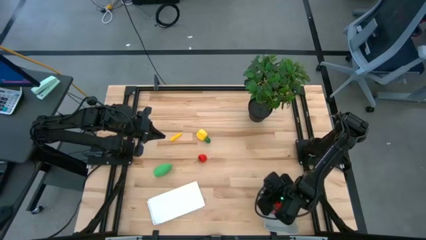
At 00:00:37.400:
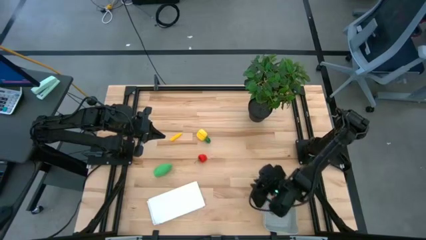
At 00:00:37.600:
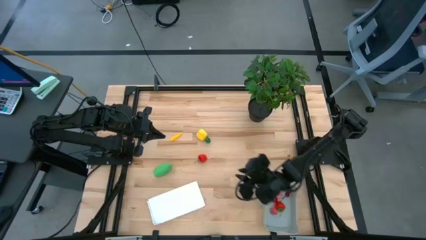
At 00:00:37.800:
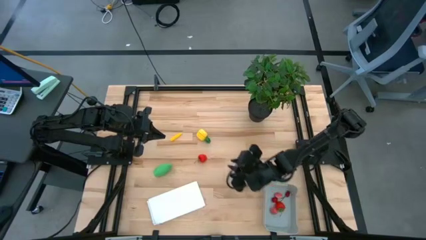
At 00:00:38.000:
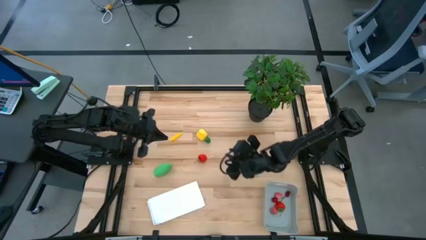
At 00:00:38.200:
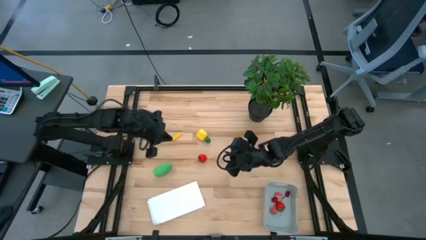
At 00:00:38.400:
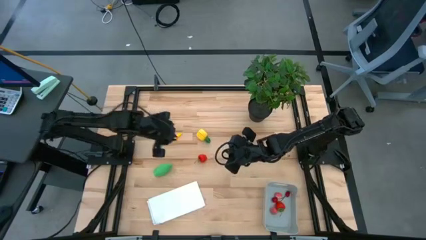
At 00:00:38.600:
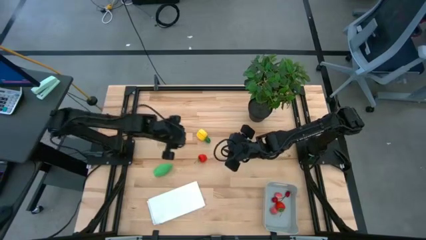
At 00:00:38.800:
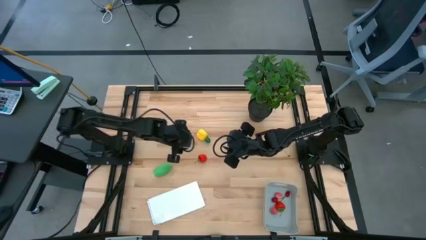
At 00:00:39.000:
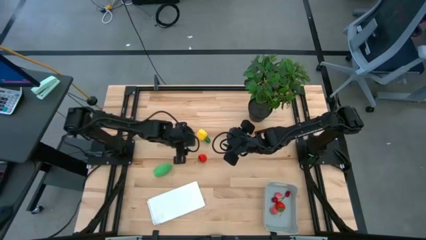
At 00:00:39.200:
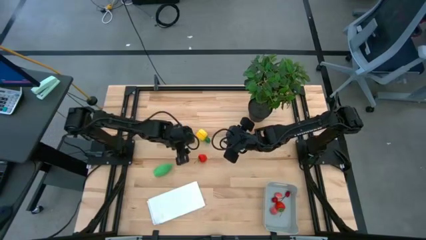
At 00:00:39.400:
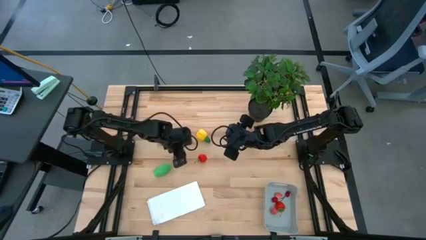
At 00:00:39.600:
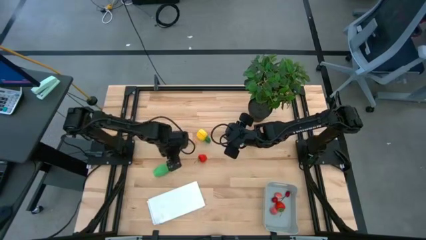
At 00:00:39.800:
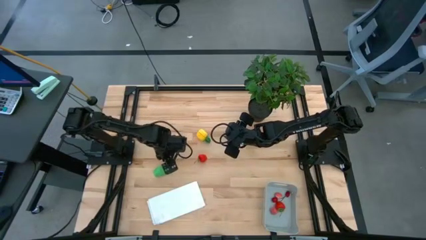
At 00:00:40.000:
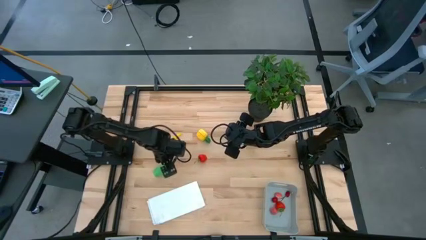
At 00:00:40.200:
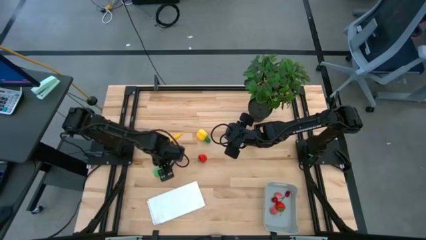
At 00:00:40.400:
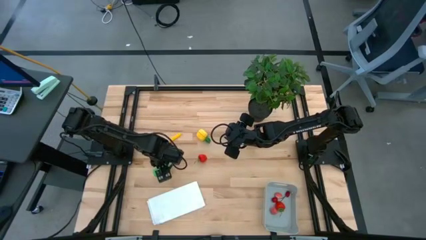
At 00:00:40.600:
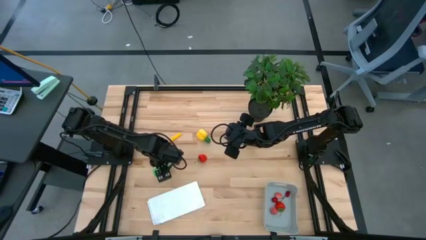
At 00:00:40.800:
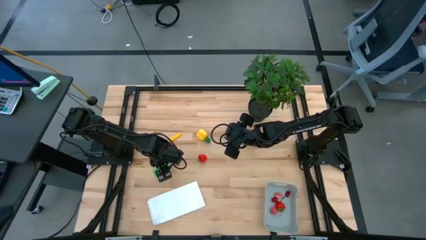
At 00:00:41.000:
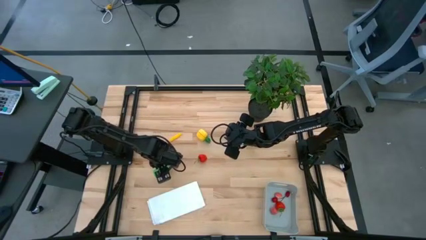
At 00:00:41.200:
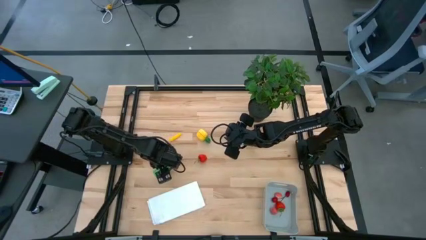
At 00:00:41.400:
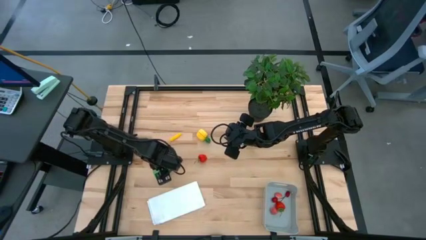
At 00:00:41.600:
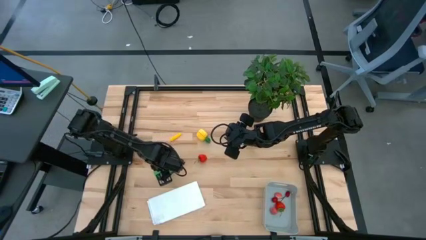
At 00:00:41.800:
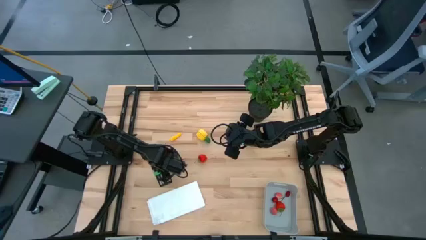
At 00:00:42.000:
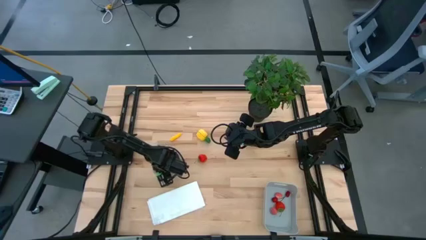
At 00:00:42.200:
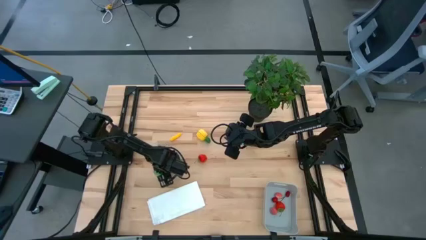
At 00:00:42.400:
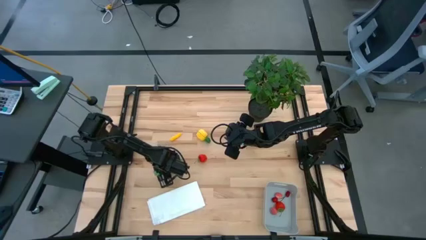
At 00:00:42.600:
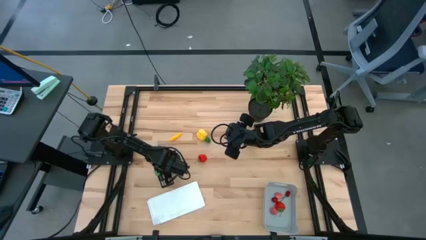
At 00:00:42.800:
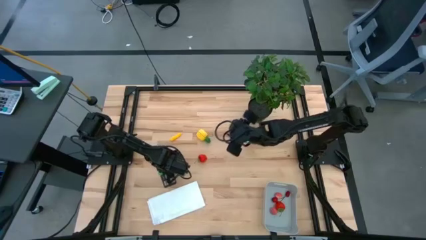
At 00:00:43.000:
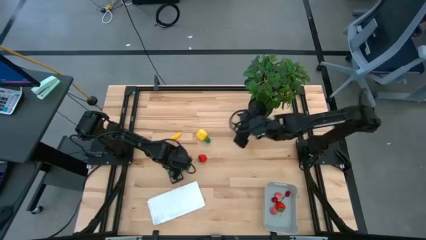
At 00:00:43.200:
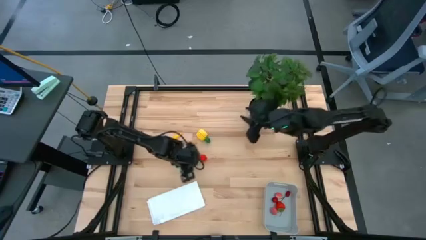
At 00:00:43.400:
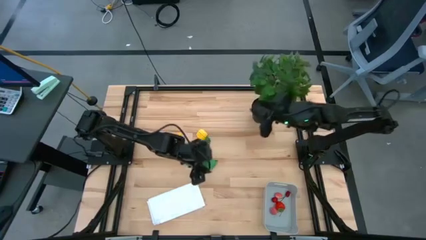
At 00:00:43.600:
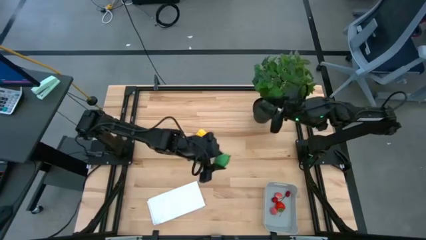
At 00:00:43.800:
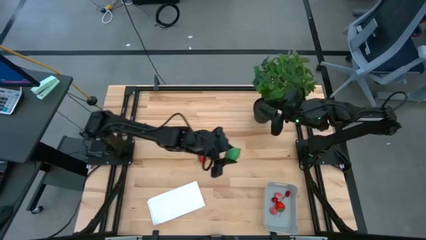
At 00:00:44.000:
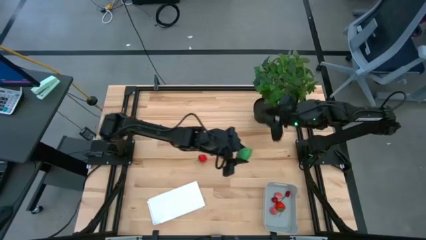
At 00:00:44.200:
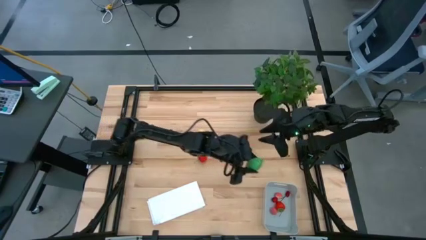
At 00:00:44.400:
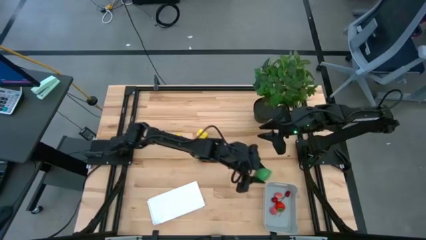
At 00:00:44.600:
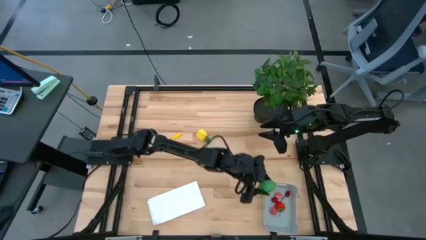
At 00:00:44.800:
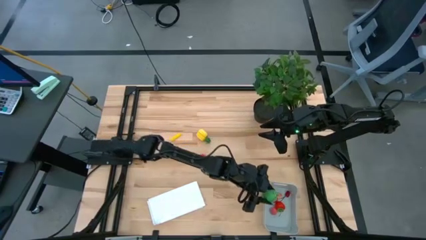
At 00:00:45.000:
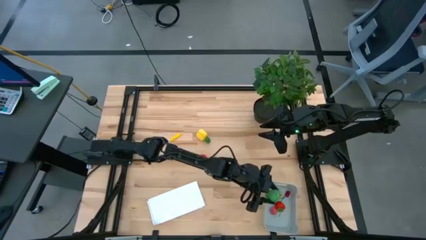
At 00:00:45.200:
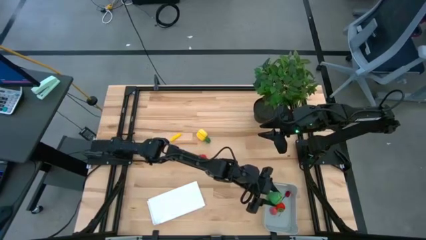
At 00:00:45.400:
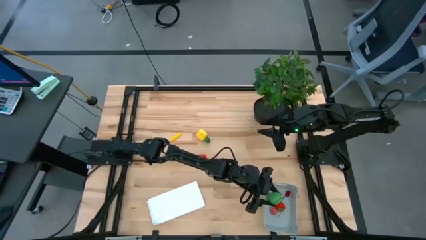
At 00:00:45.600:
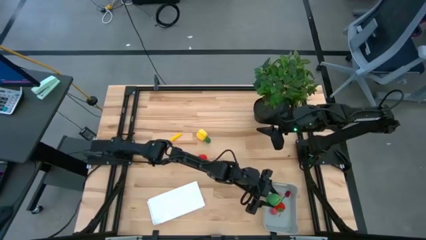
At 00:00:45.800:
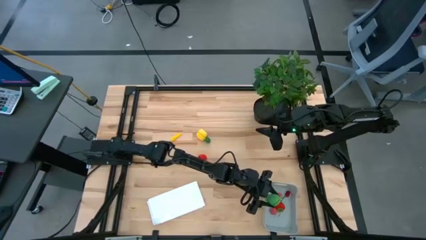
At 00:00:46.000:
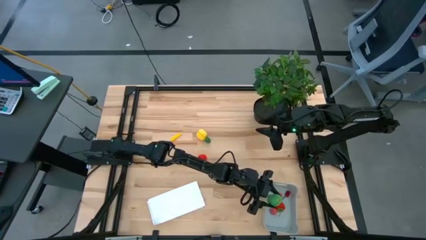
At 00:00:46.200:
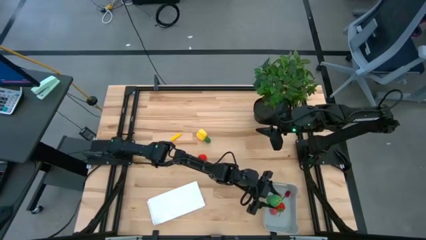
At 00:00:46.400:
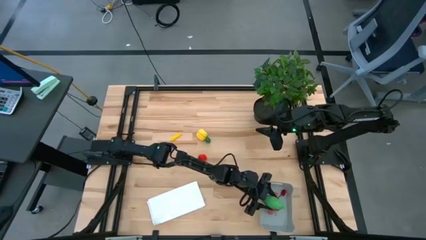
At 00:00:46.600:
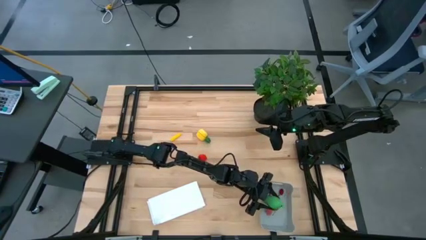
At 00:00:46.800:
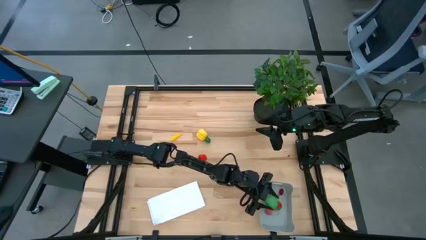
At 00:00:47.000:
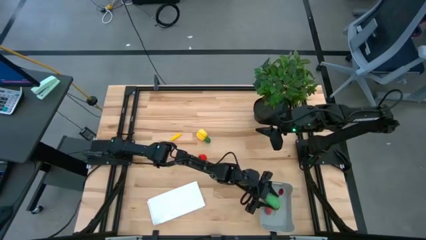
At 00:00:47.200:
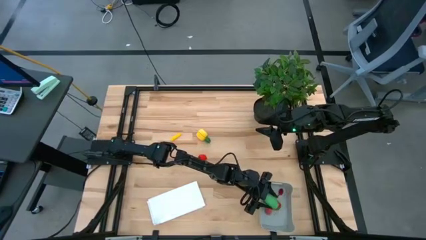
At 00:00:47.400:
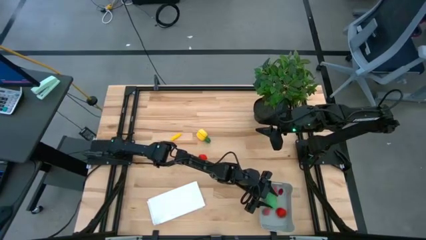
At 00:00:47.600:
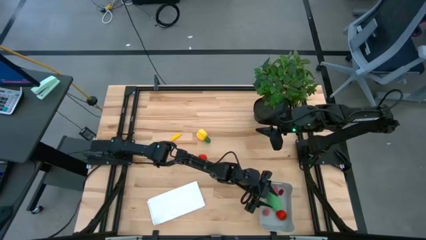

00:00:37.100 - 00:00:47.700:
Task: Pick and placing Produce into tupperware
Put the green corn into the gray bin

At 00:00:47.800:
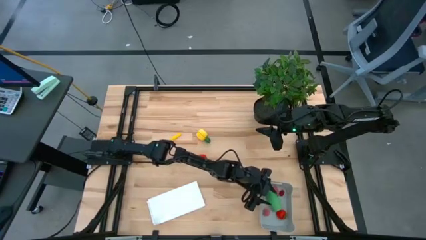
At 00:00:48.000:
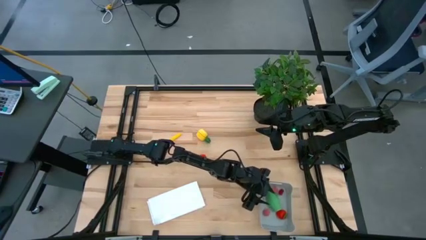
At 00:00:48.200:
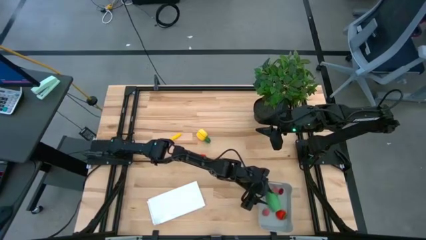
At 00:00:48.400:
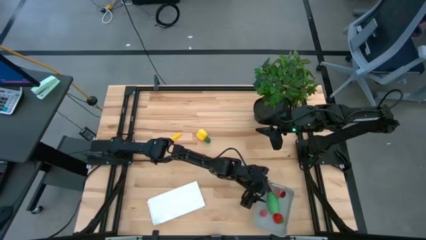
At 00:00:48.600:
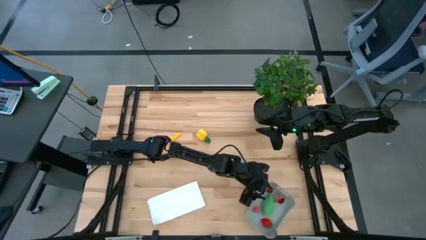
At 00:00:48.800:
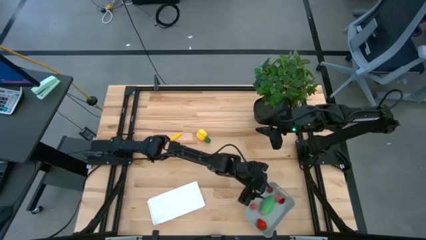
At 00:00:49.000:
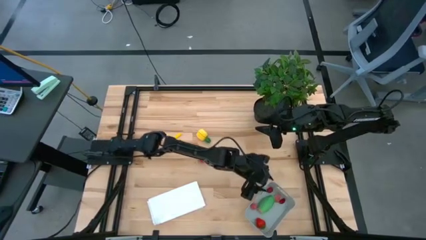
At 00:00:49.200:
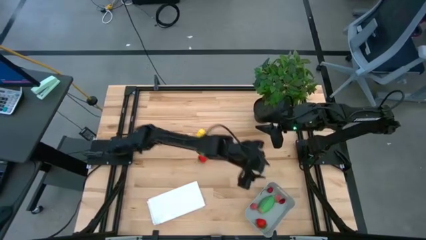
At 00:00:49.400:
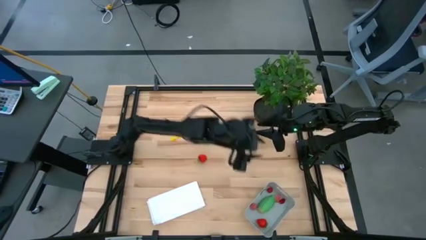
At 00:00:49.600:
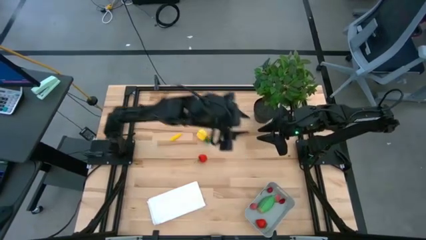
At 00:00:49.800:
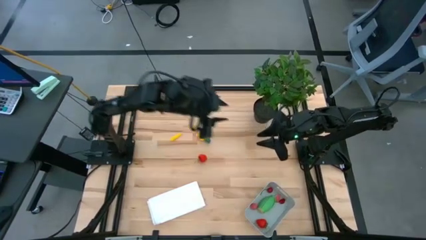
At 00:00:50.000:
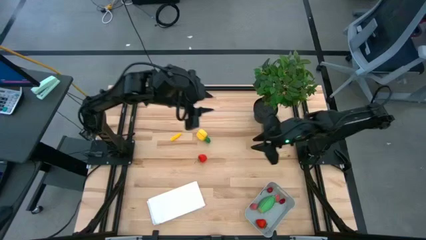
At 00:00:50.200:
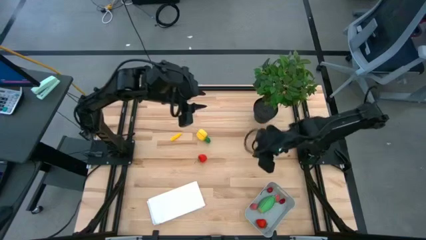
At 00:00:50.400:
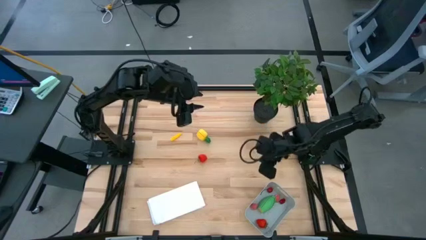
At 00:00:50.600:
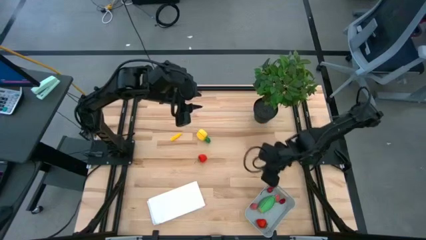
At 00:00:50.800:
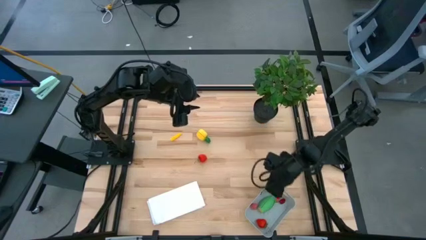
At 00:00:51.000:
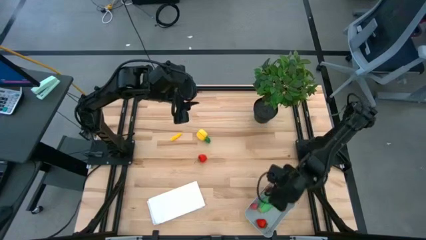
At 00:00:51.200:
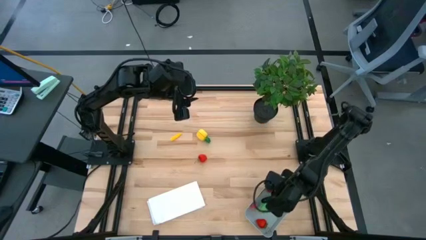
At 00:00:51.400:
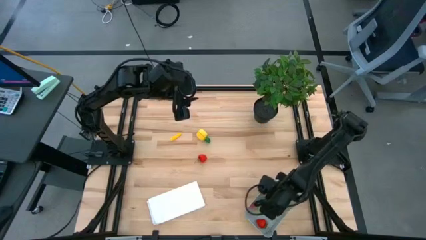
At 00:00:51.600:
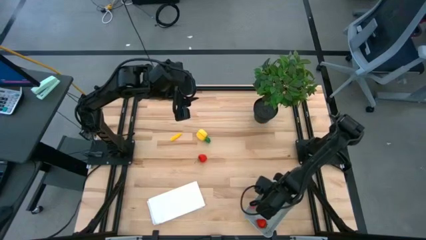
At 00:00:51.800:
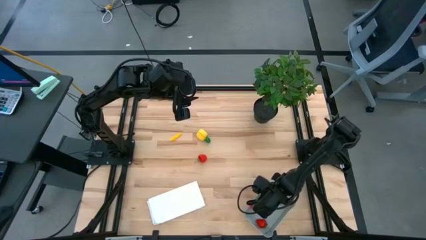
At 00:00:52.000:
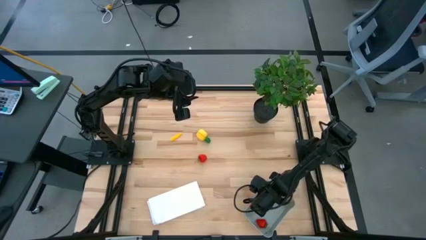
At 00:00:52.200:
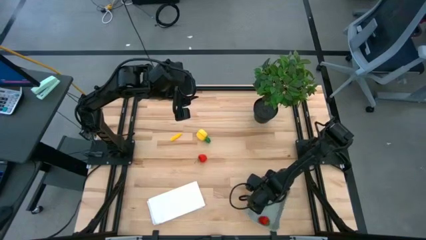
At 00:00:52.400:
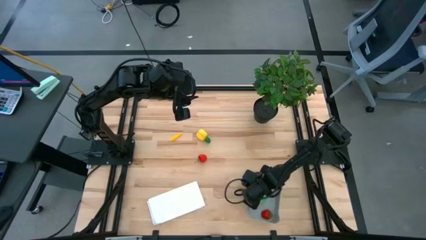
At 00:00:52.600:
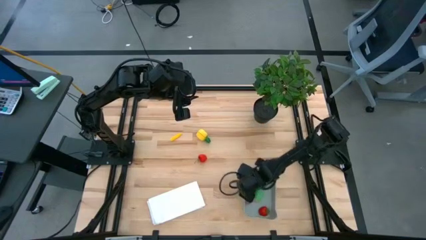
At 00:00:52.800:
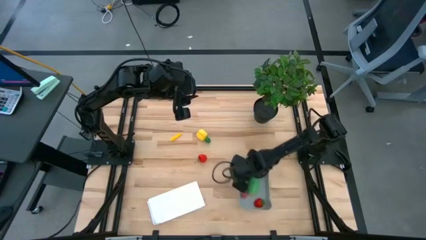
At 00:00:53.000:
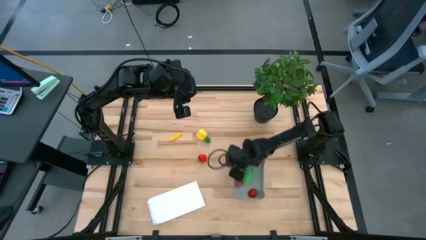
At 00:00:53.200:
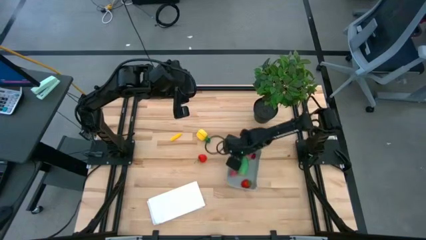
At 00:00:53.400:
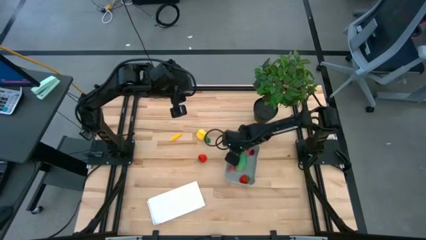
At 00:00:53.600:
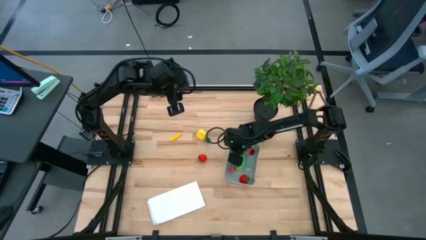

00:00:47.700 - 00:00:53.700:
Move the gray bin to the center of the table
